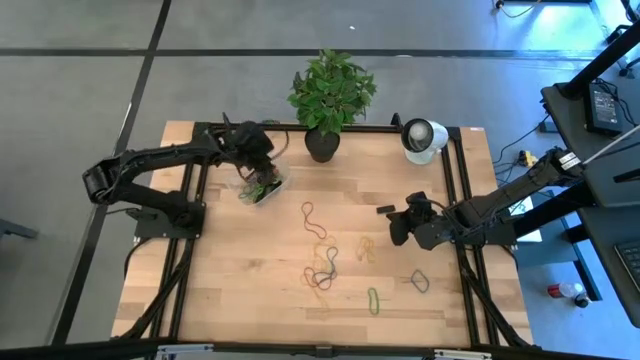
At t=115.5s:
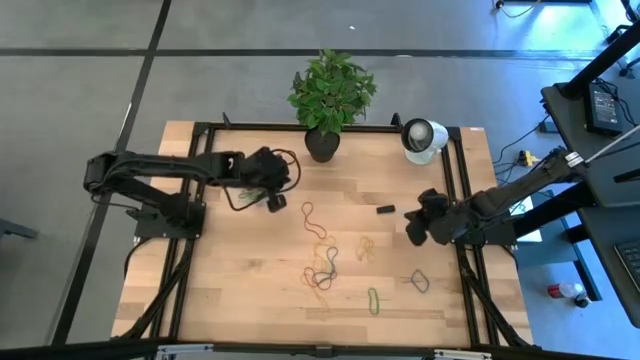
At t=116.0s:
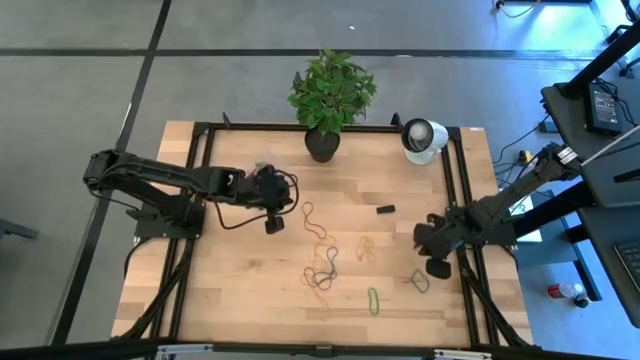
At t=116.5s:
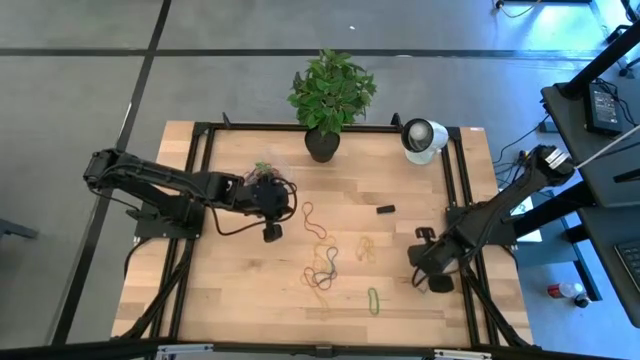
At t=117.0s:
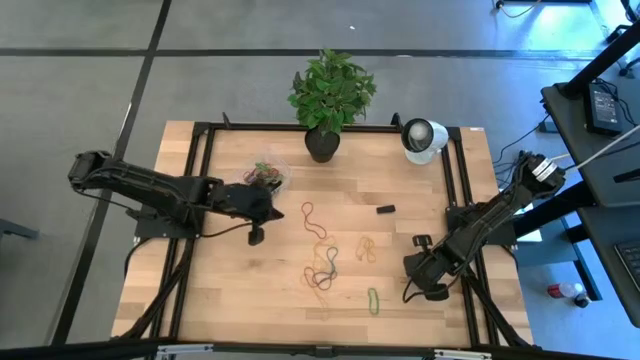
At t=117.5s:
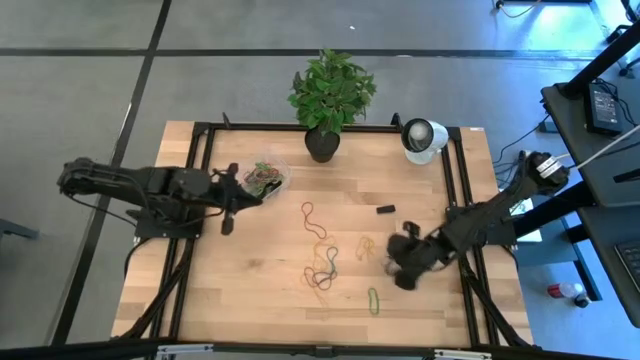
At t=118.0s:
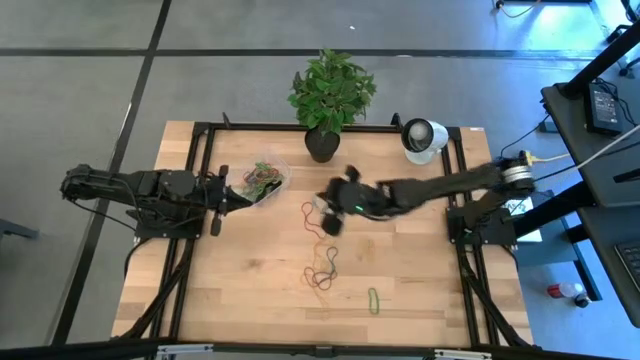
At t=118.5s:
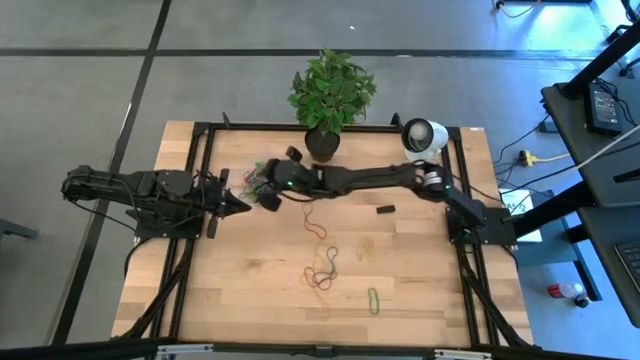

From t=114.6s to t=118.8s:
Task: Pick and place rubber bands into bin
Put the blue rubber band into the transparent bin

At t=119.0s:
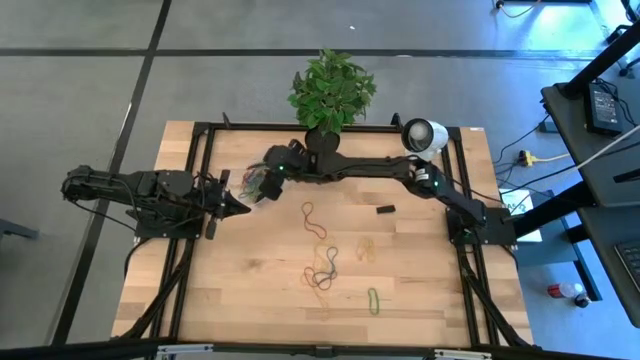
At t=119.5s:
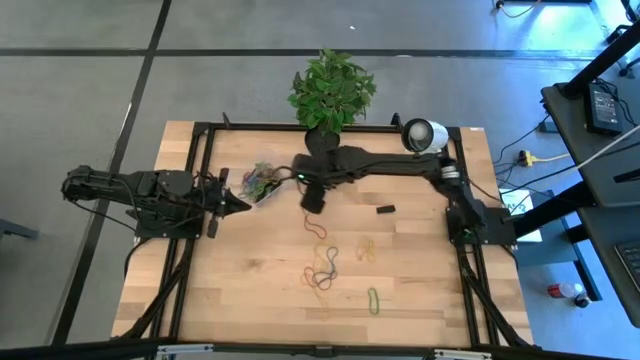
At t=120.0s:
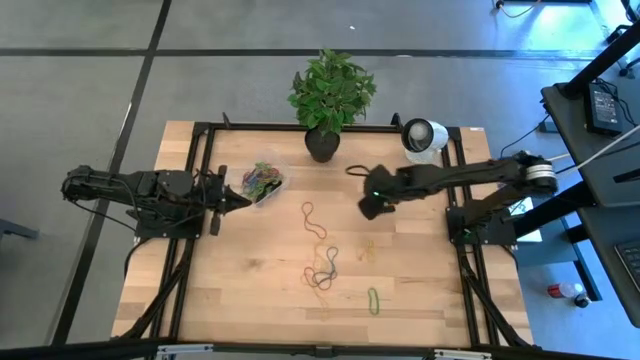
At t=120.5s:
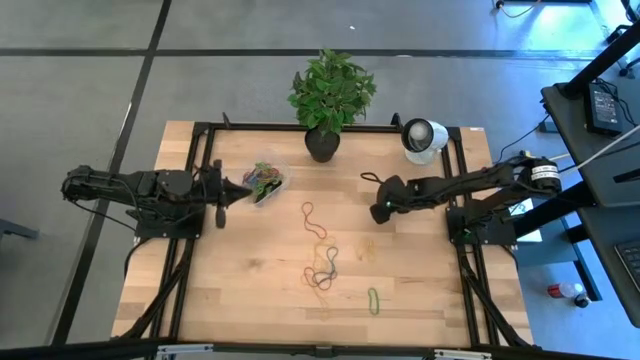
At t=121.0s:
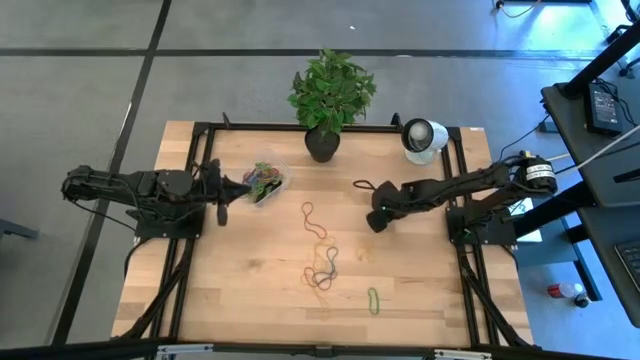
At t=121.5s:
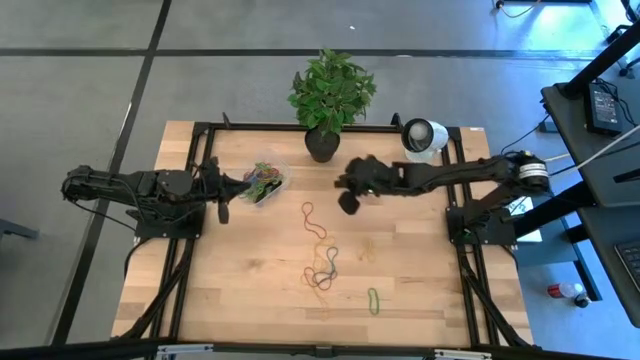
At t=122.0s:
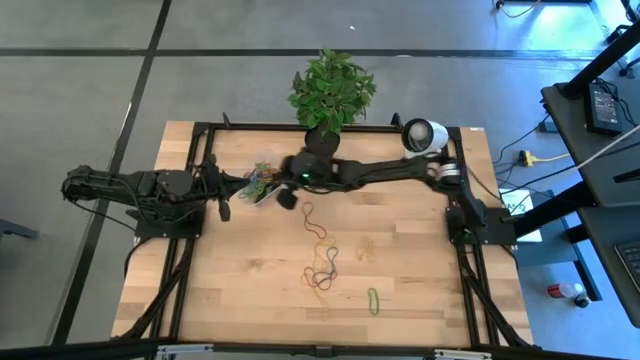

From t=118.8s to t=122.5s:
Put the black rubber band into the transparent bin

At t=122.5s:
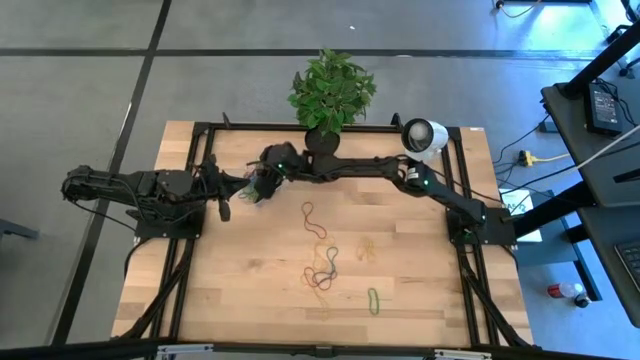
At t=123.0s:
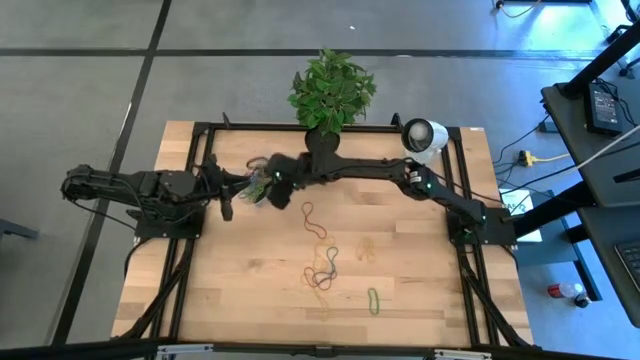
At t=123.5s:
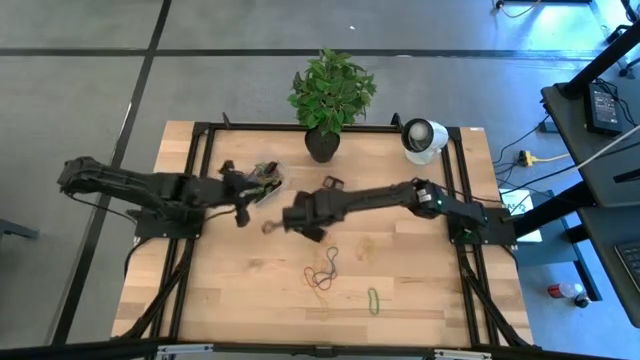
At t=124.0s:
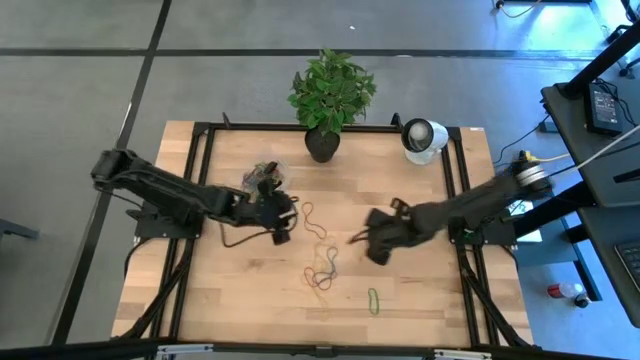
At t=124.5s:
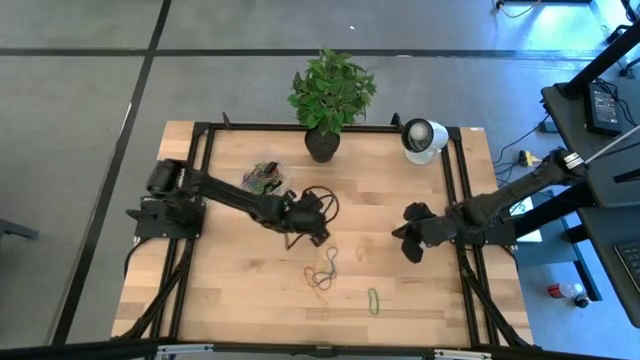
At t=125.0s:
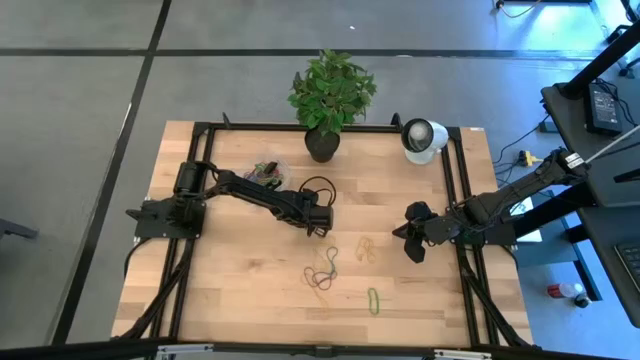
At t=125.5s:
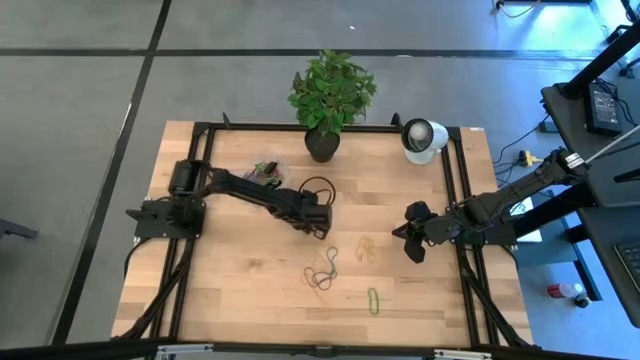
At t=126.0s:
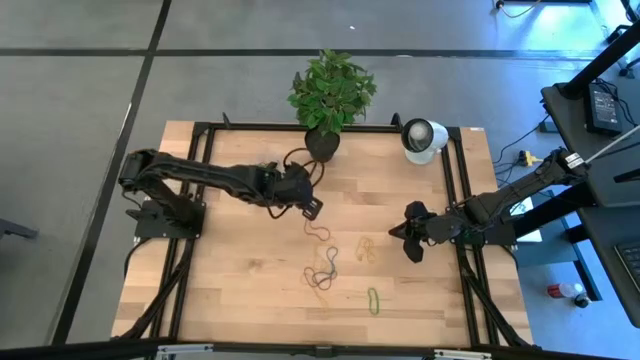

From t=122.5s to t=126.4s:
Put the red rubber band into the transparent bin

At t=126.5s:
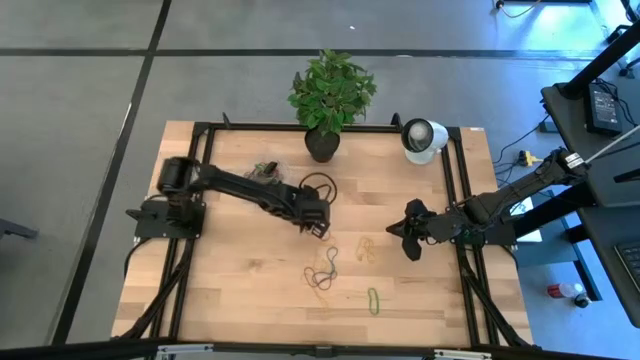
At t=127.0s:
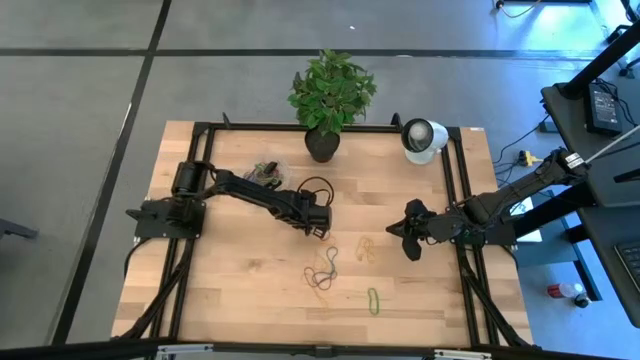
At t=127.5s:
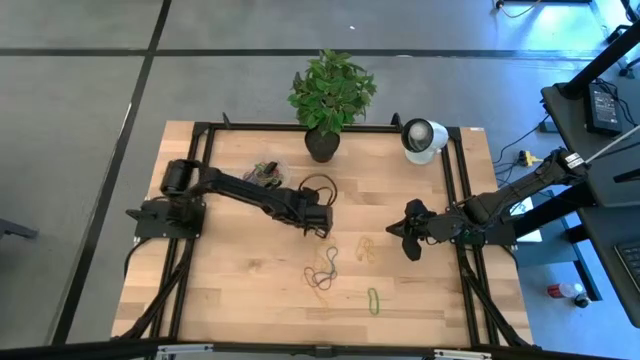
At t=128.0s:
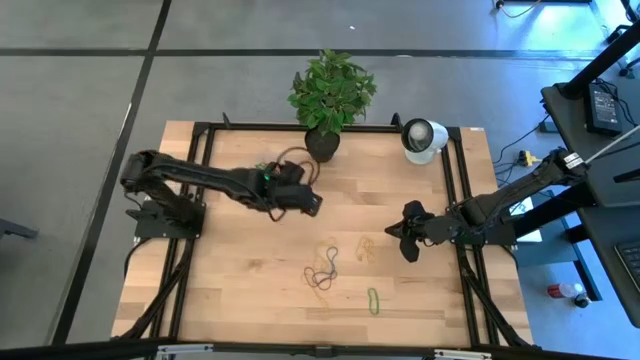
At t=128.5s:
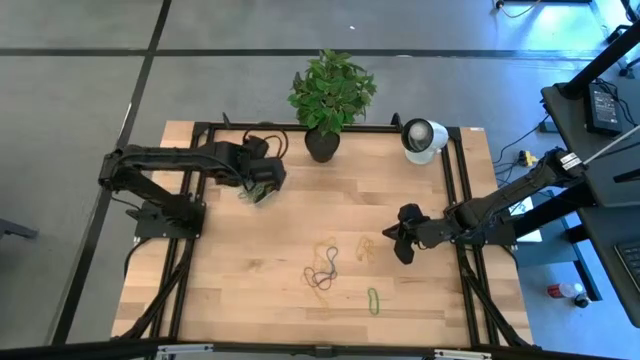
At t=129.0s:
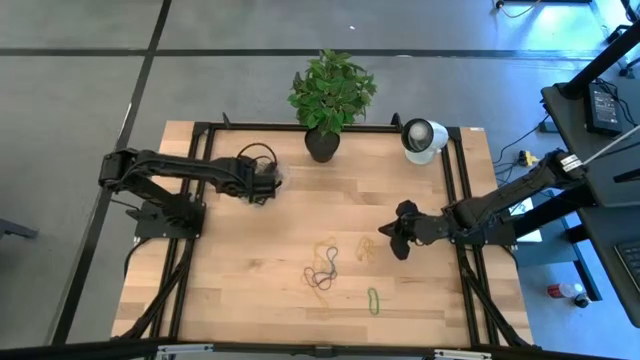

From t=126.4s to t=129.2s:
Put the red rubber band into the transparent bin

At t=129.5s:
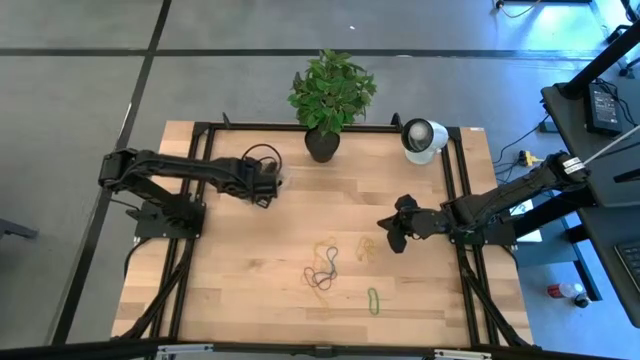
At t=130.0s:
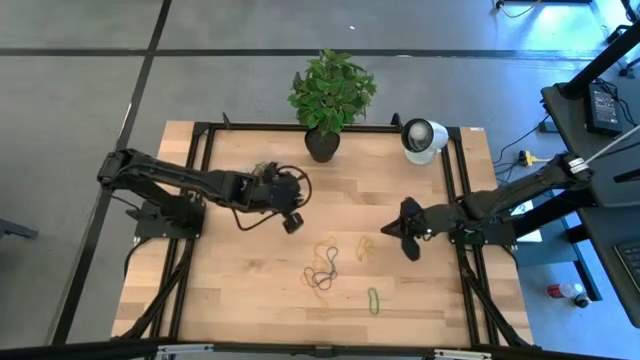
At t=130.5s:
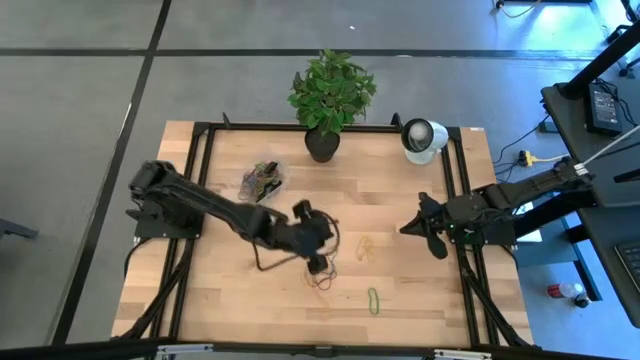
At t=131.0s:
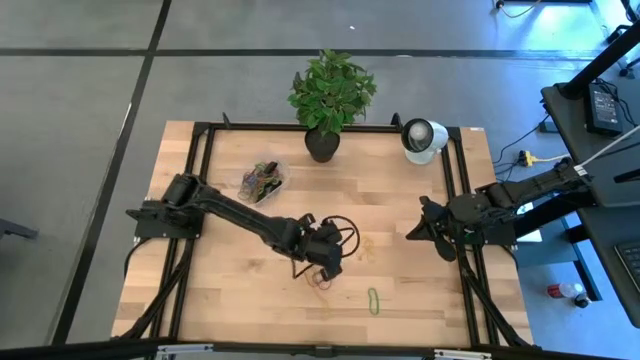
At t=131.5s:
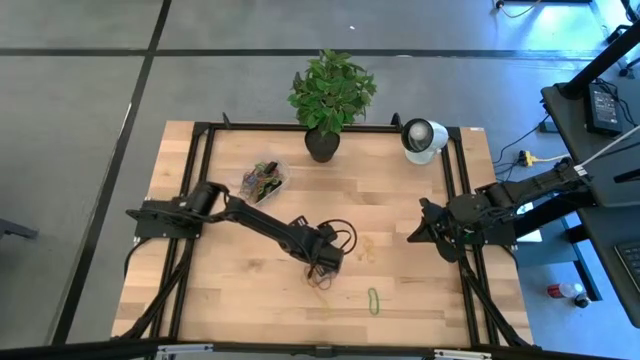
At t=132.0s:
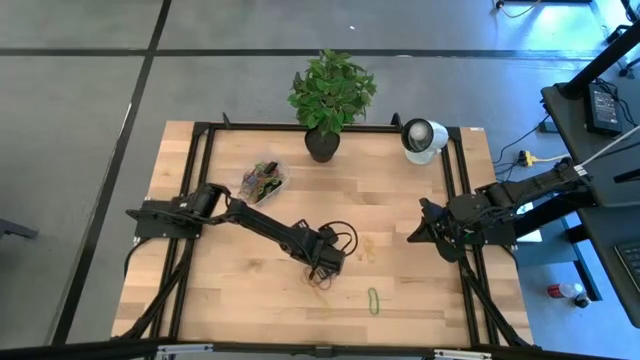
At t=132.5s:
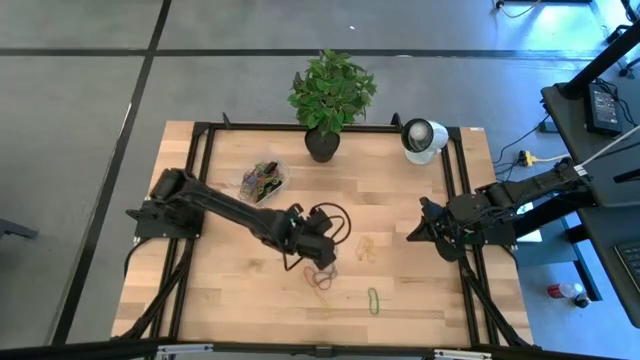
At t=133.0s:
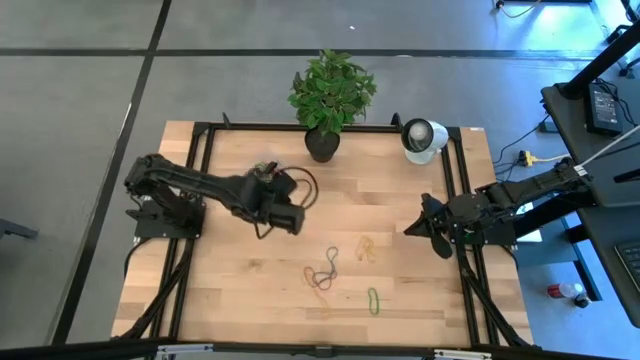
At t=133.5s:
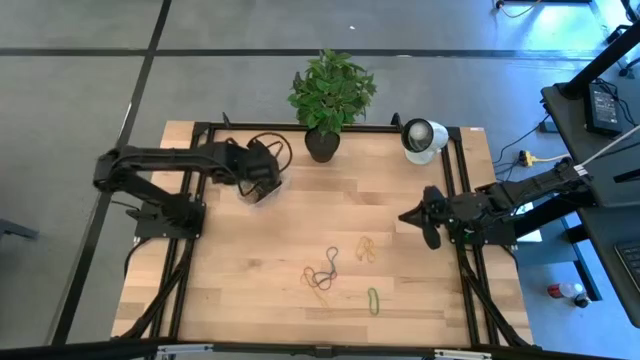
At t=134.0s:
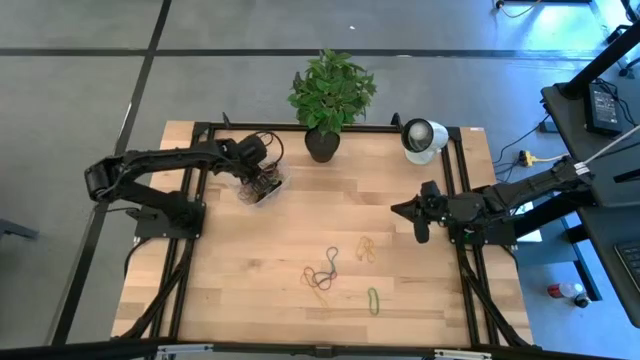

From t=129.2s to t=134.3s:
Put the yellow rubber band into the transparent bin

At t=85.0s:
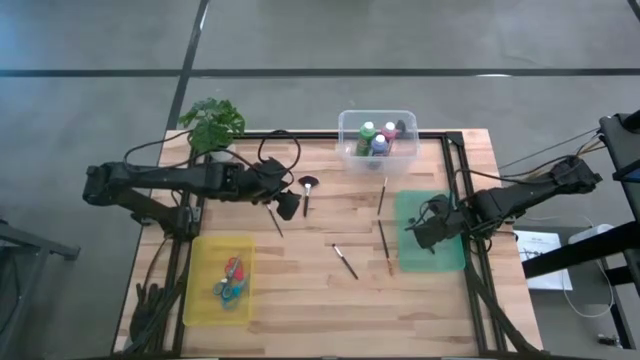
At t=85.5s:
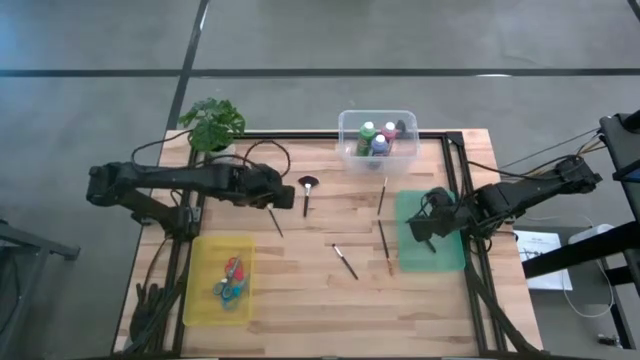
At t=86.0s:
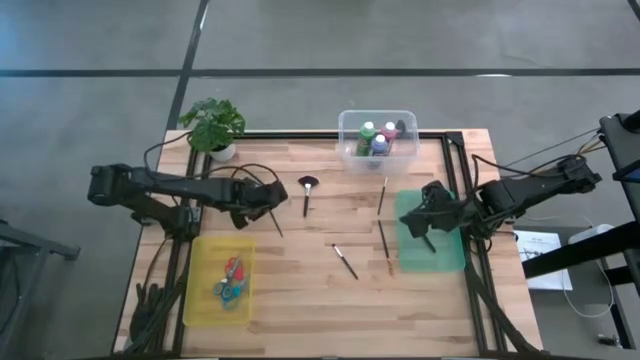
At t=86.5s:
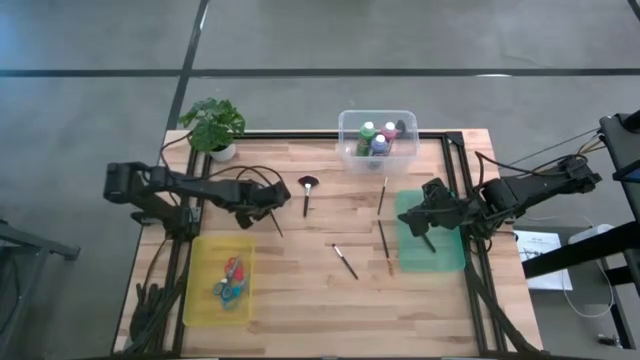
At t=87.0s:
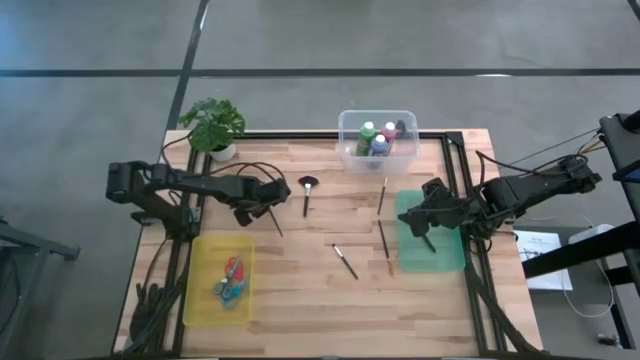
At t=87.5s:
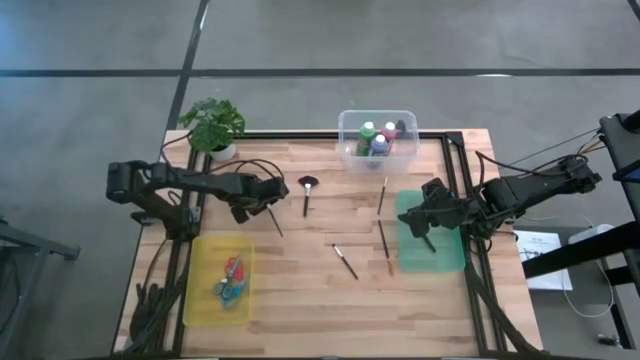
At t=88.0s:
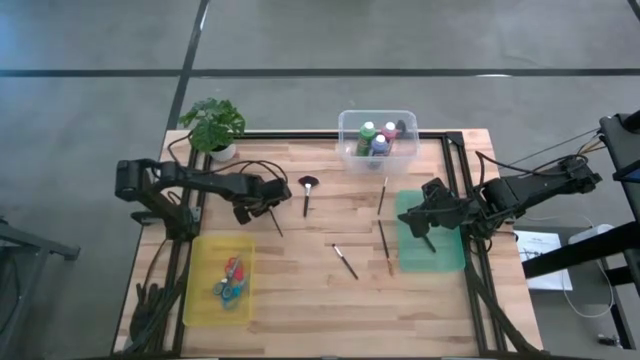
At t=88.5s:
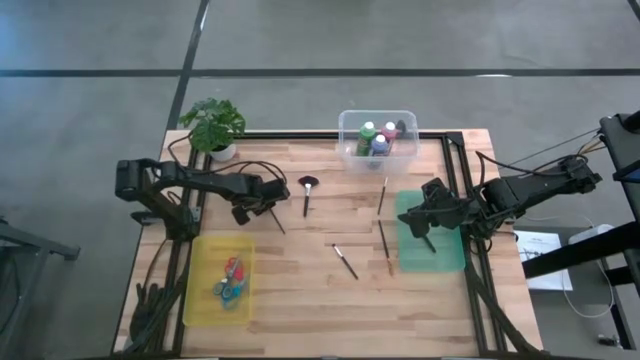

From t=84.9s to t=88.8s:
Task: Pick & Place Paint Supplies
Put the black eyebrow and eyelash brush into the green bin
